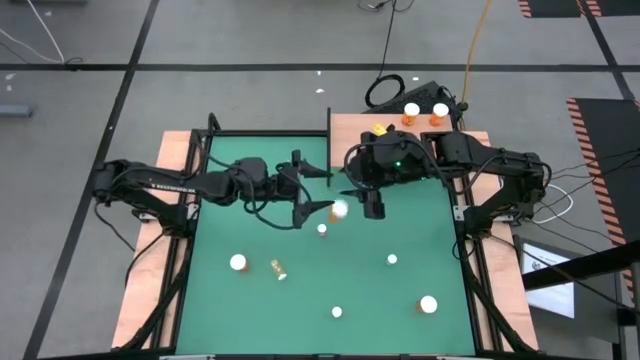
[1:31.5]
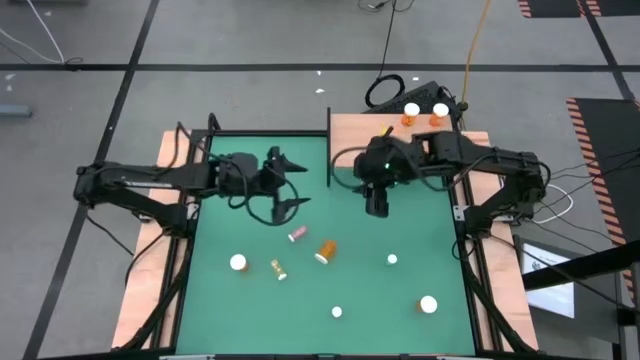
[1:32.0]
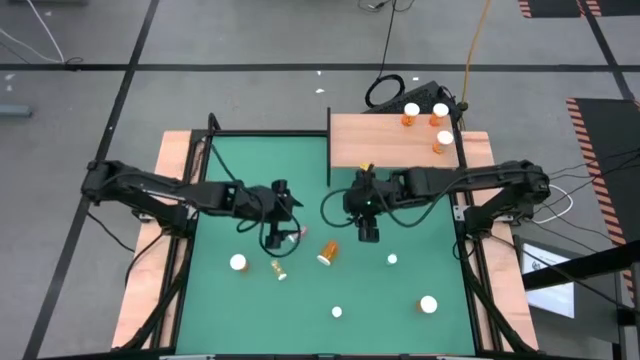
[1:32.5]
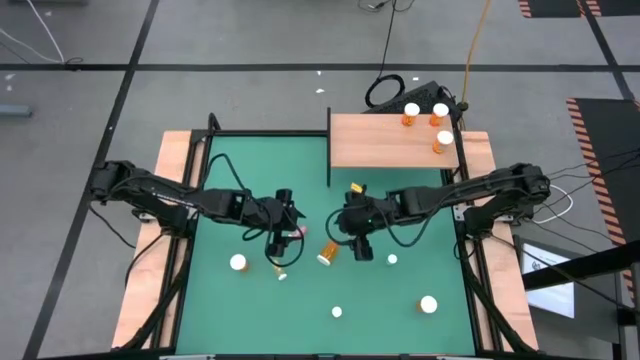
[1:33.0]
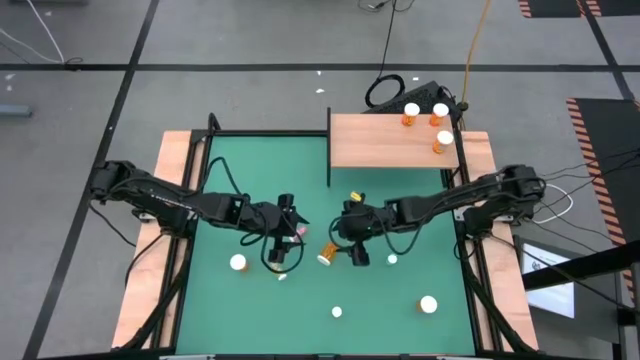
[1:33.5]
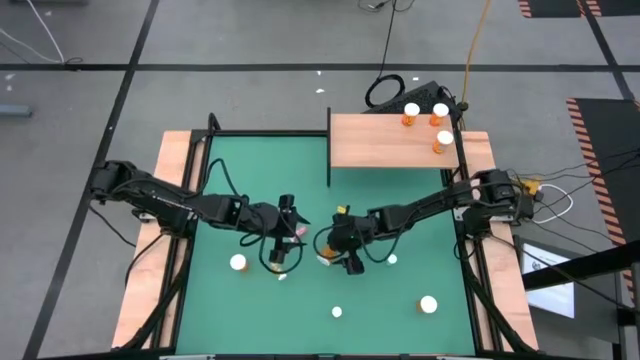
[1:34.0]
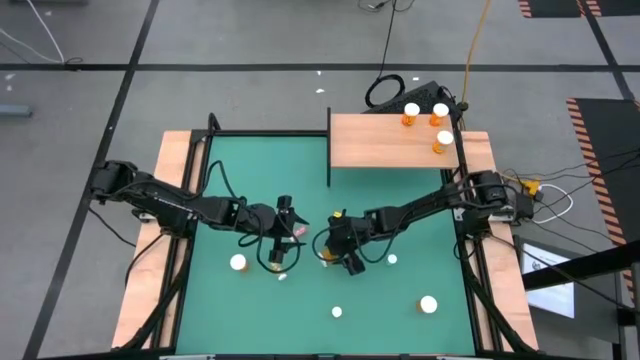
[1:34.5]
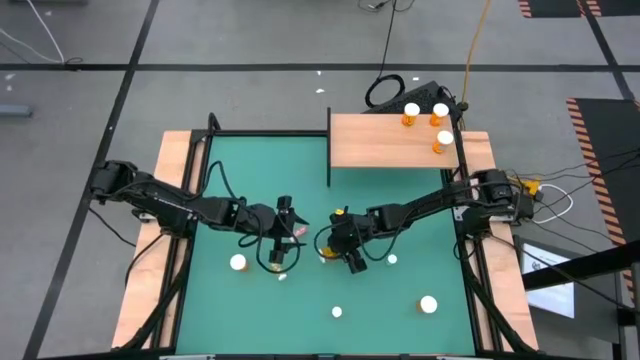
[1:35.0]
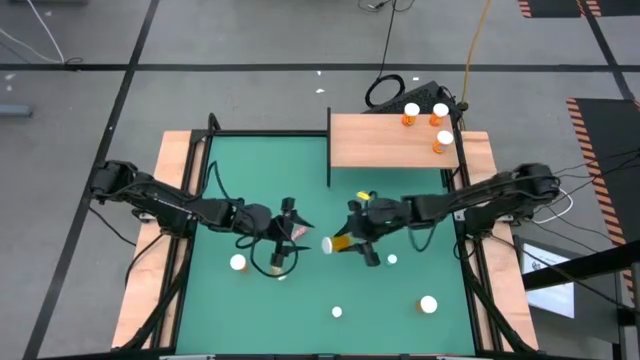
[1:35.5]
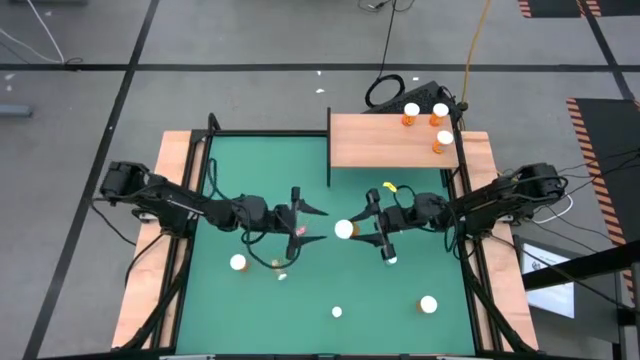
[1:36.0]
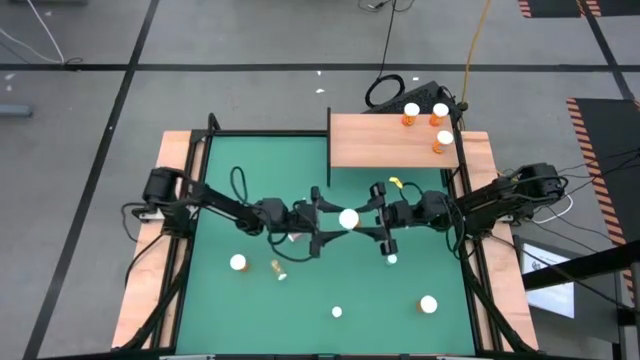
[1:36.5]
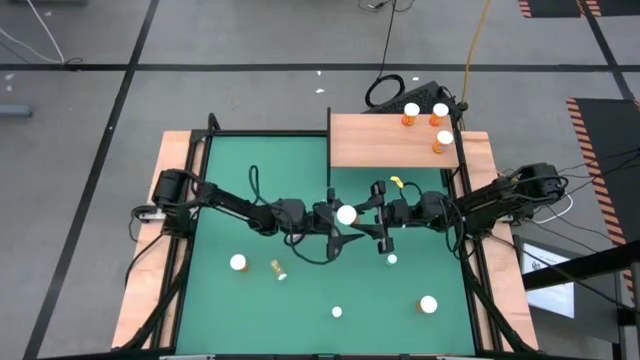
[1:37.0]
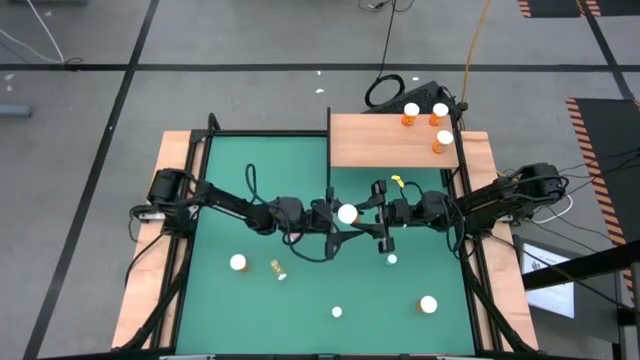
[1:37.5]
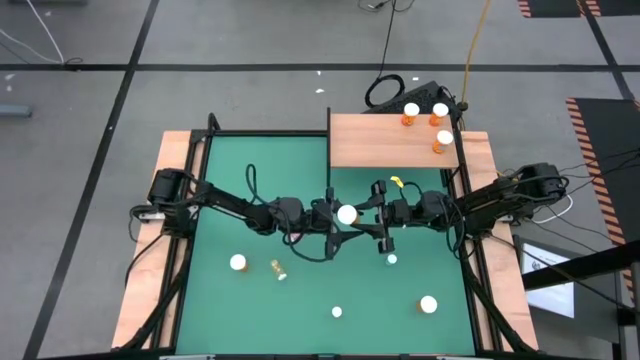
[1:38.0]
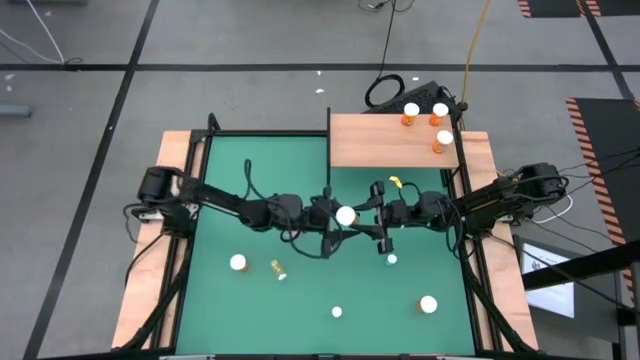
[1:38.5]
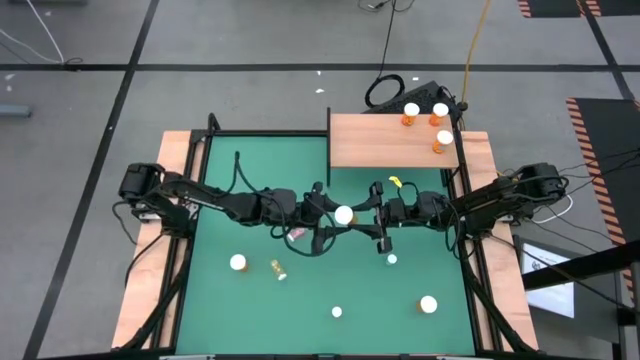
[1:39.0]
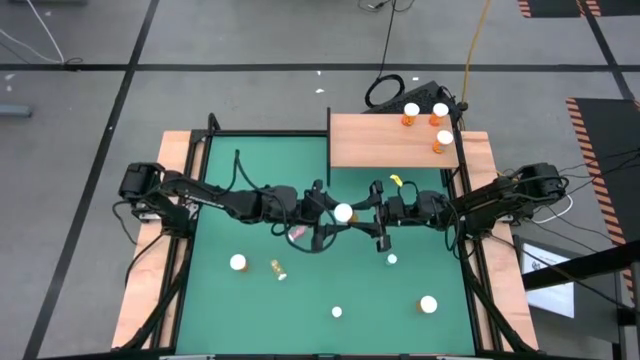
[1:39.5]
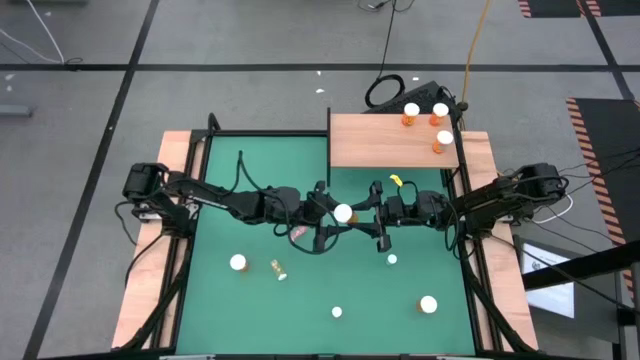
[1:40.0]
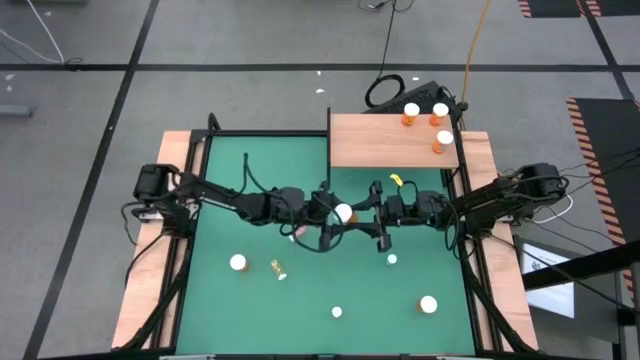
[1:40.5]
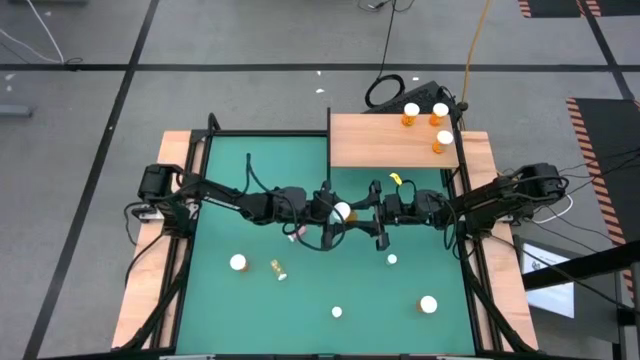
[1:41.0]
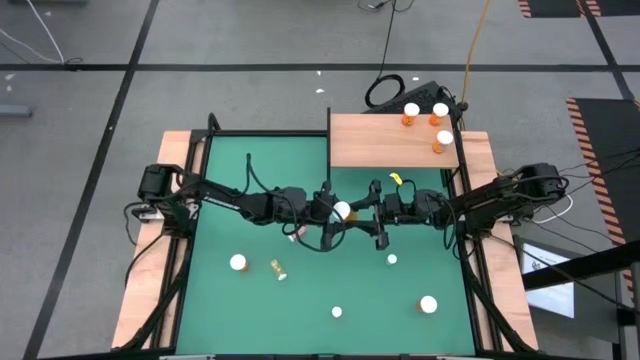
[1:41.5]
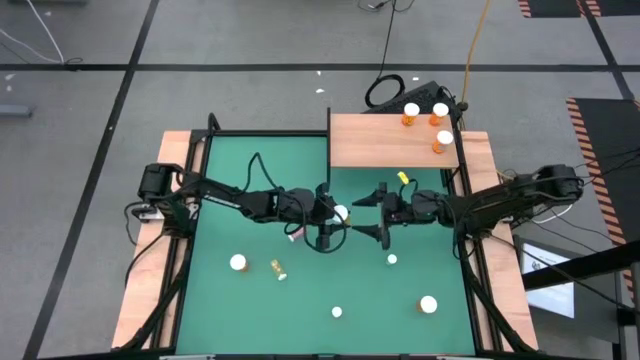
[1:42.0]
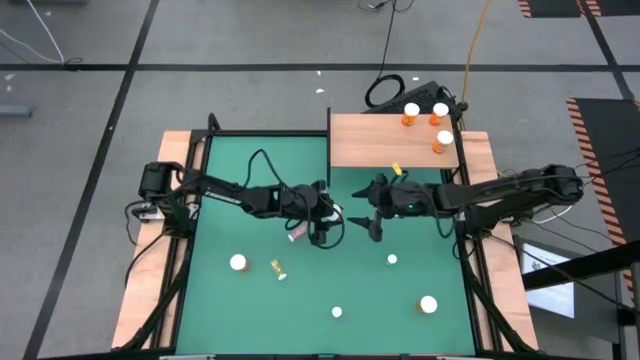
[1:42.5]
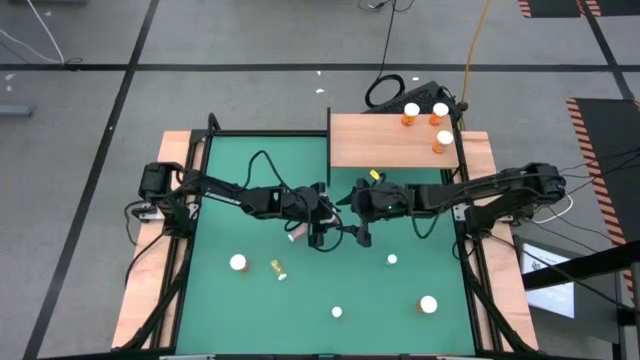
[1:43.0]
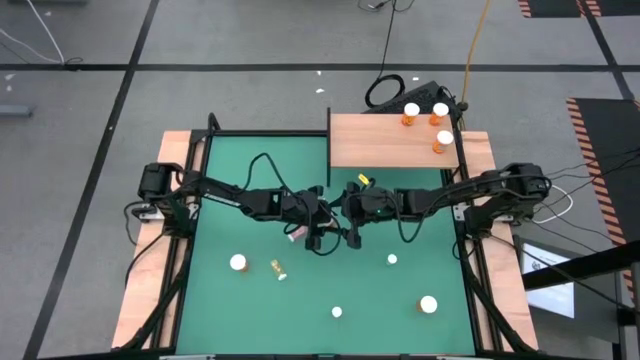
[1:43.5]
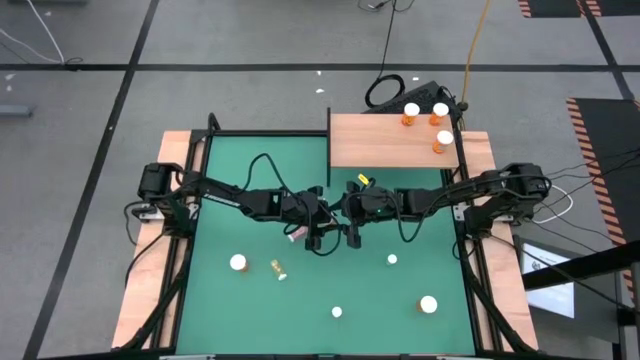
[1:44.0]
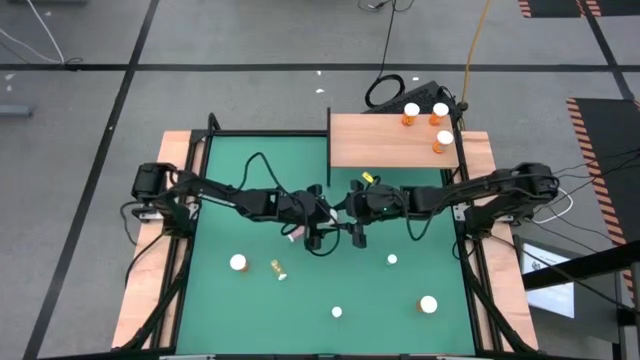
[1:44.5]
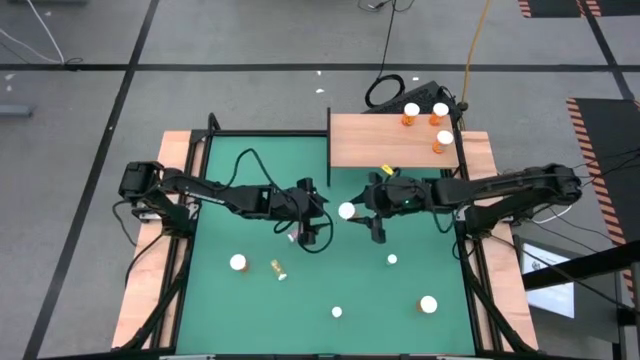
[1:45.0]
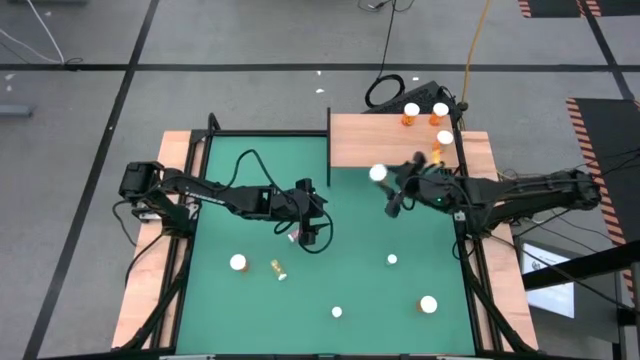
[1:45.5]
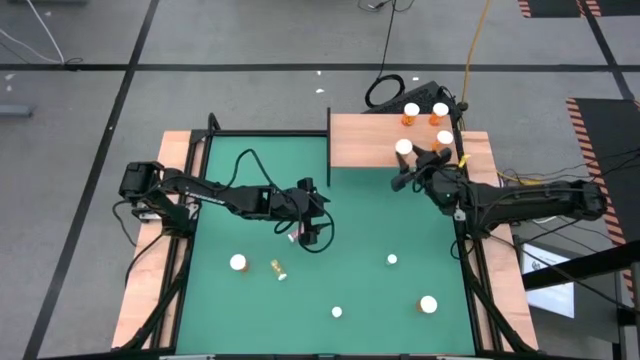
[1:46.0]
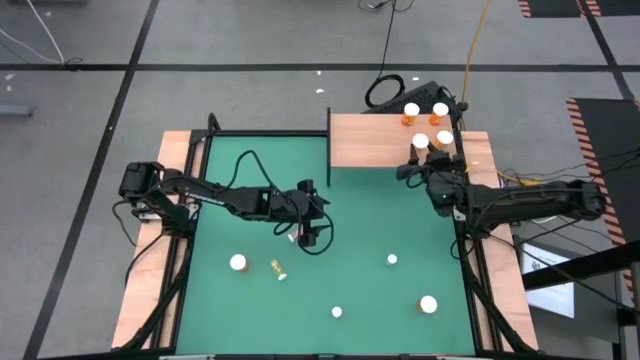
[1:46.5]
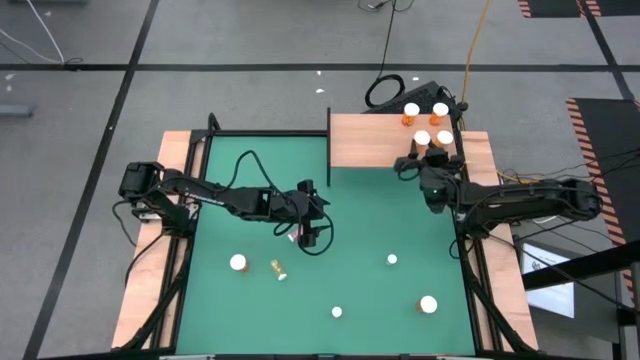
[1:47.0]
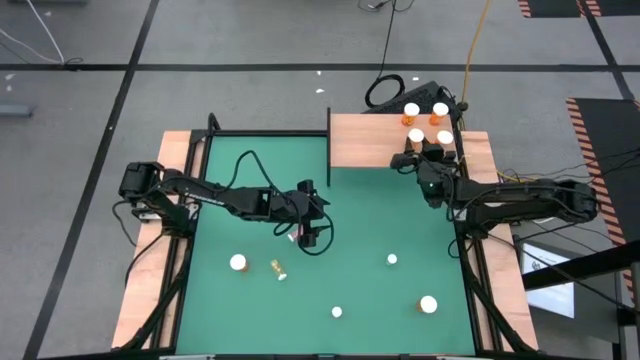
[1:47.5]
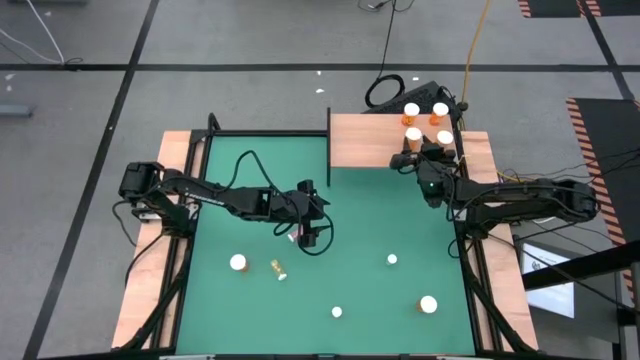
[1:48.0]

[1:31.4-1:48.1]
Task: Pick and place medicine bottles onto shelf by color
Put the orange pill bottle on the shelf

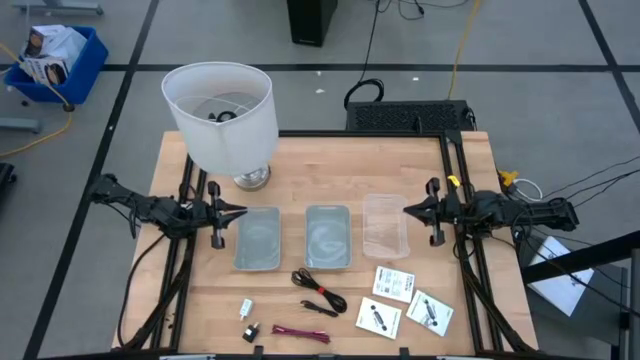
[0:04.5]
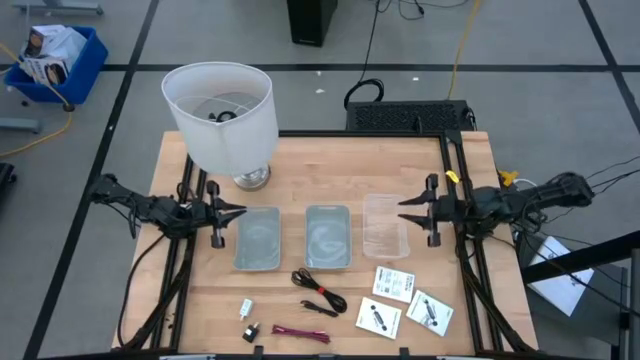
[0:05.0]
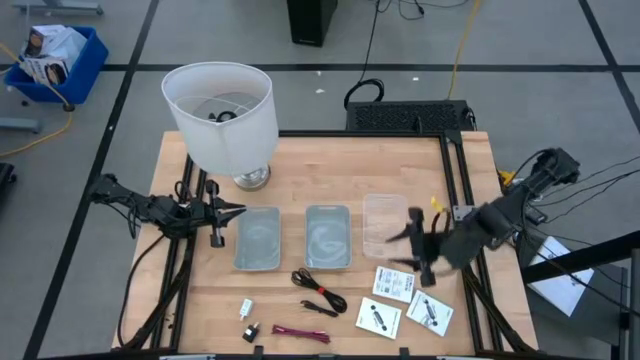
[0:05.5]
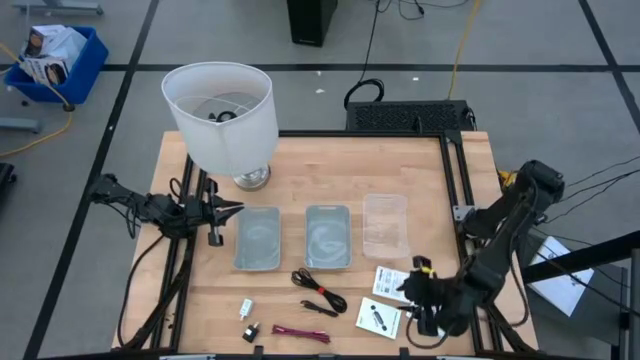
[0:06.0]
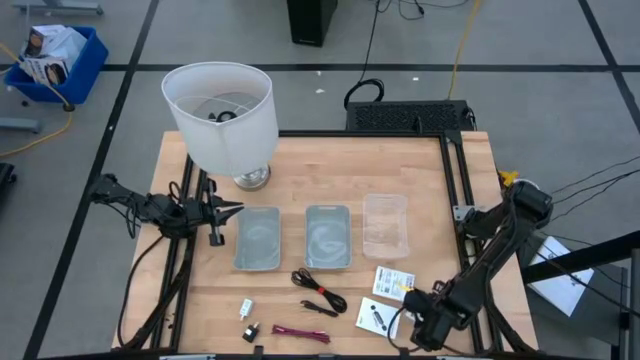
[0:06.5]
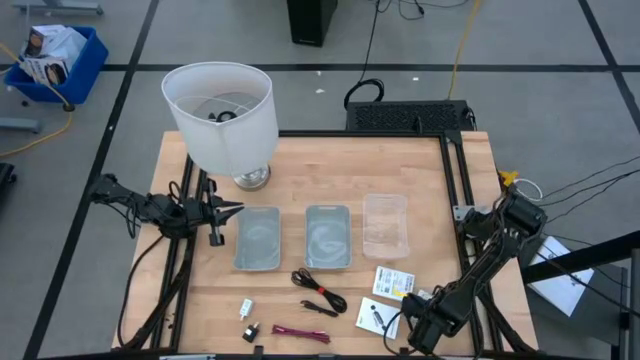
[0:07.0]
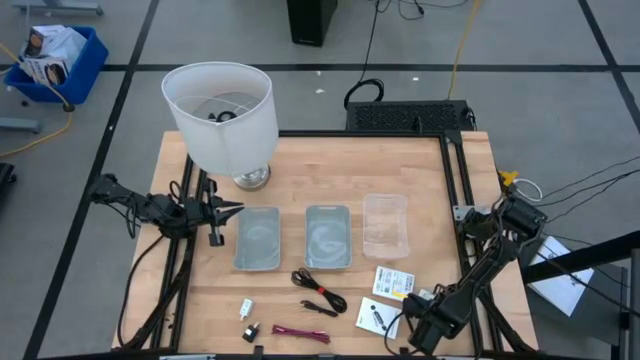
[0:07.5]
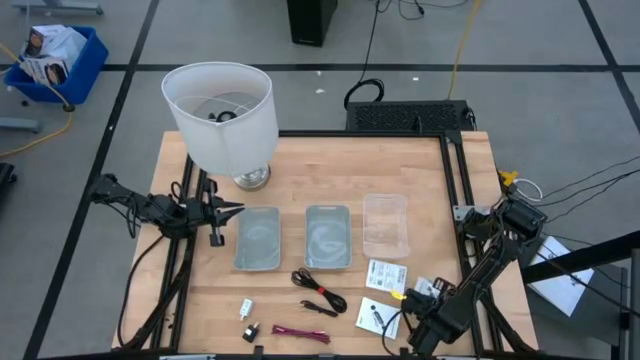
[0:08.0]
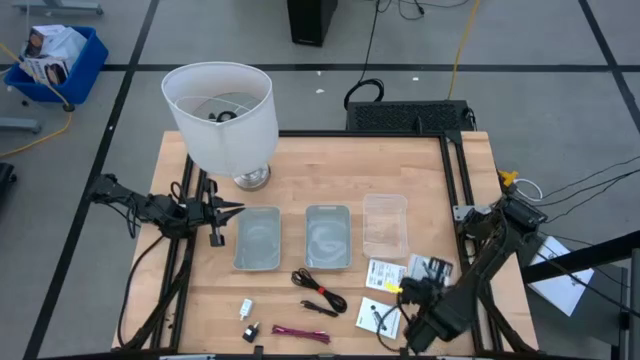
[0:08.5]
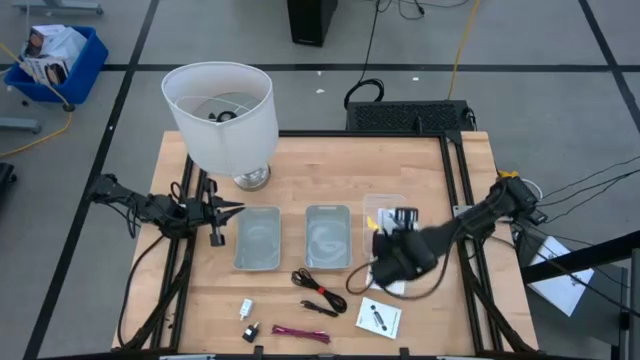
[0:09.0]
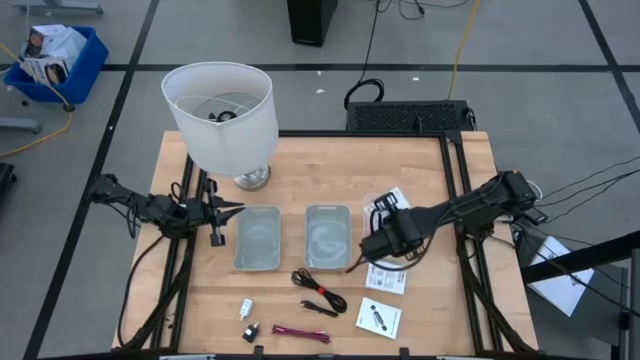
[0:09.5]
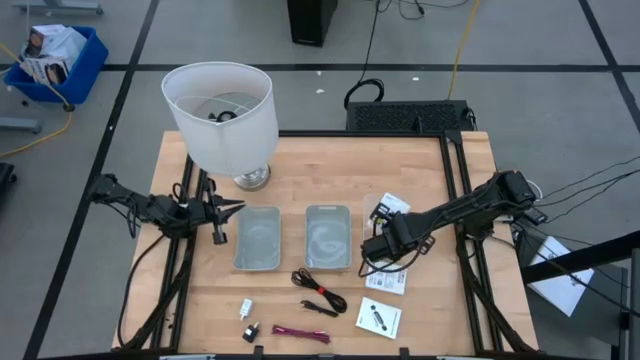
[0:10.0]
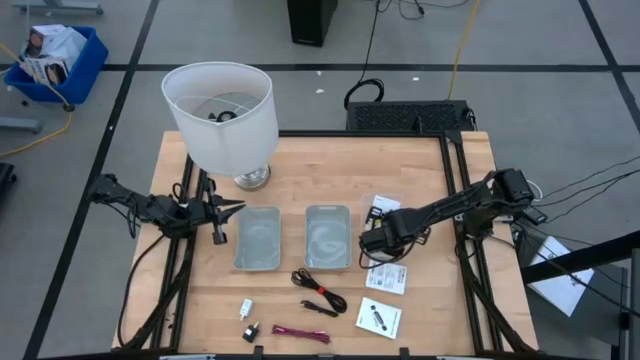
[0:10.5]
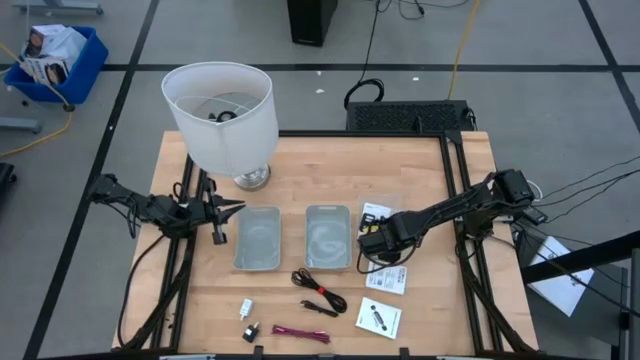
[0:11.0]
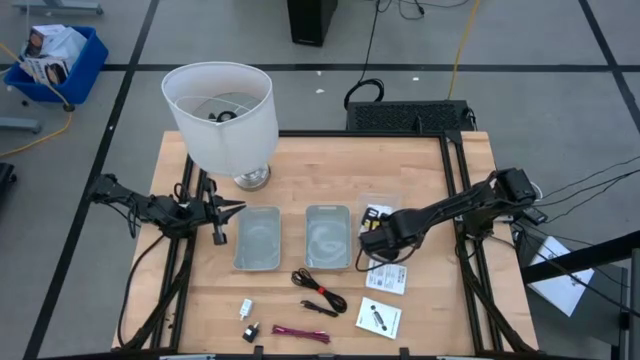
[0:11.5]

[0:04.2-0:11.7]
Task: Pick and place items into bin
Put the bottom right white card reader box into the transparent bin
